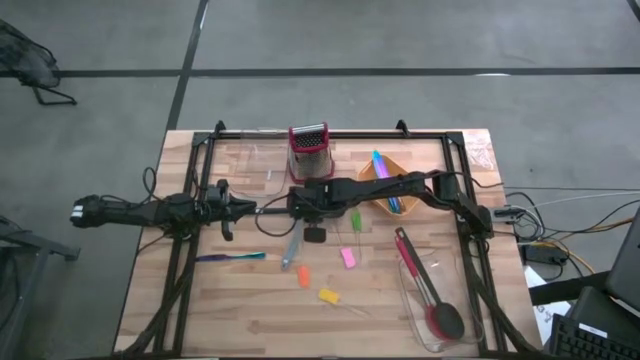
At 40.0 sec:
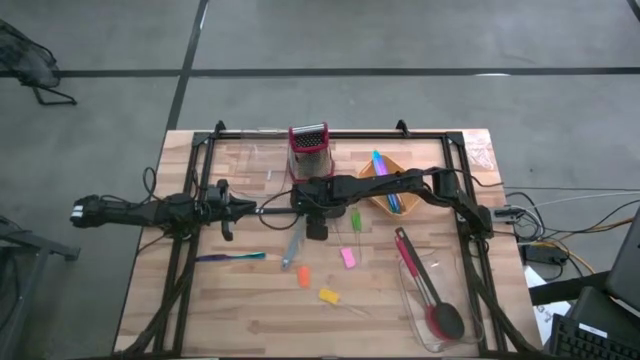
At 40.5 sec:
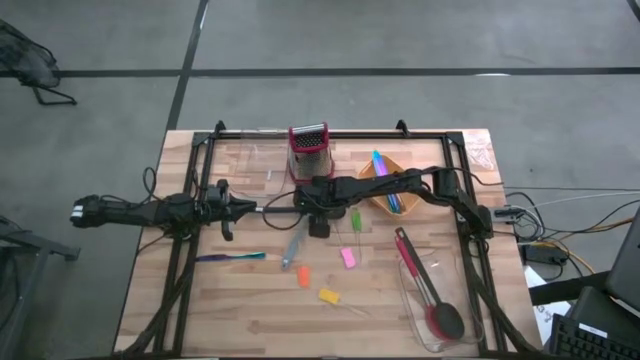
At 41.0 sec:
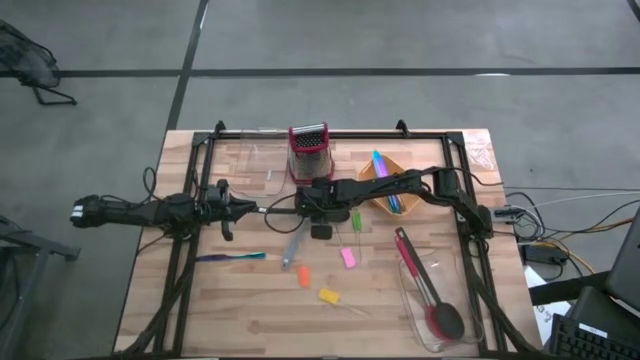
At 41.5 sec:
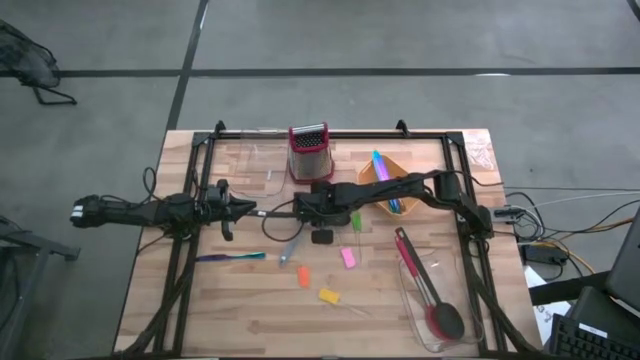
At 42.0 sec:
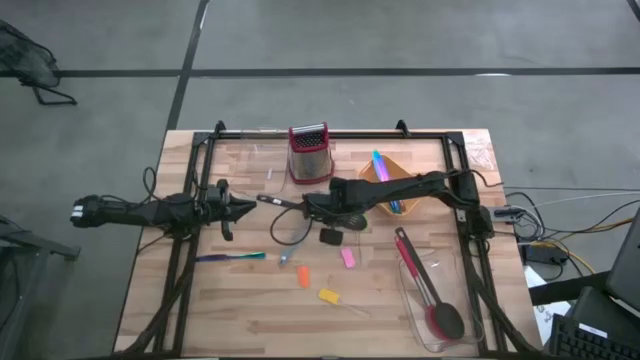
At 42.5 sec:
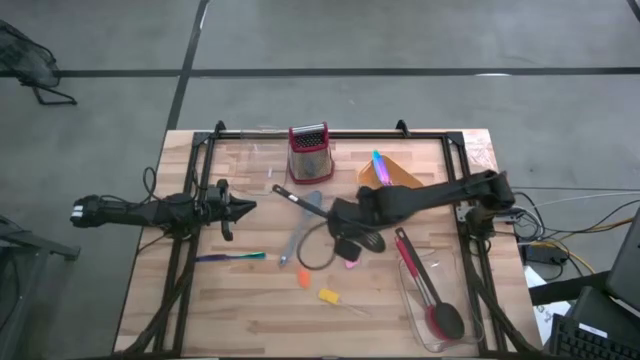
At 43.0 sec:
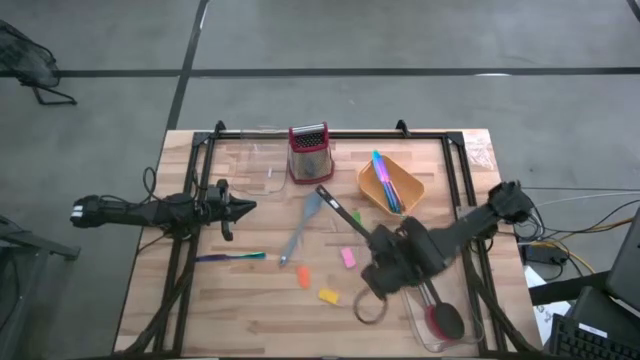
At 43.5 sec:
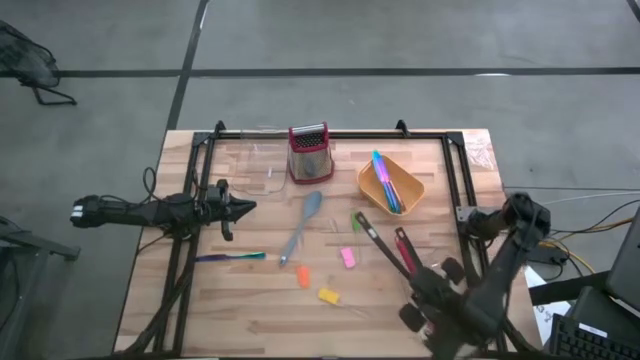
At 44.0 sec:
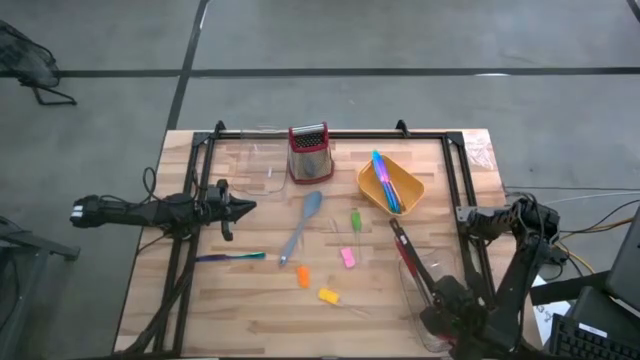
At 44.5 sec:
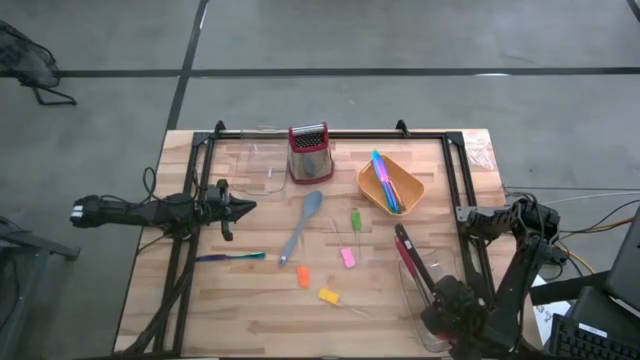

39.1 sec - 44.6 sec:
Task: Pick & Place Kitchen Items
Put the black serving spoon into the bottom transparent bin

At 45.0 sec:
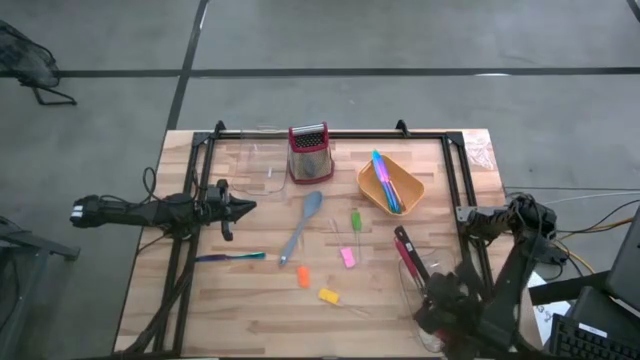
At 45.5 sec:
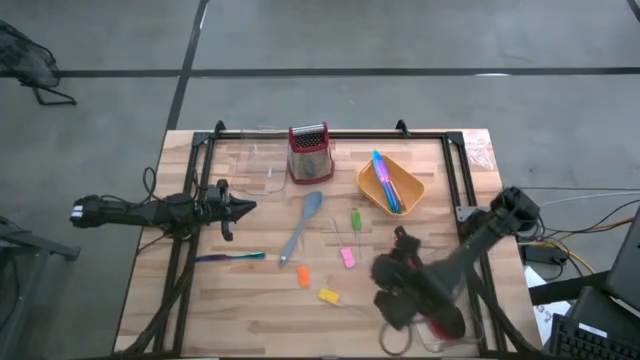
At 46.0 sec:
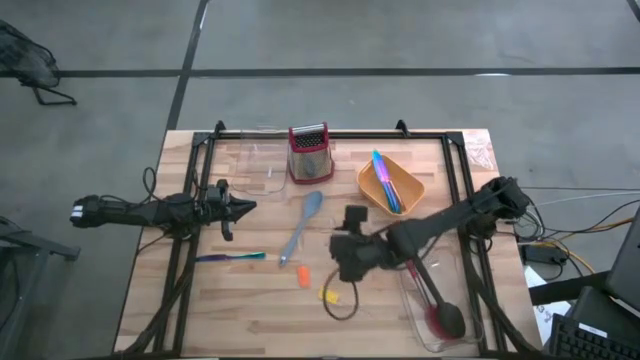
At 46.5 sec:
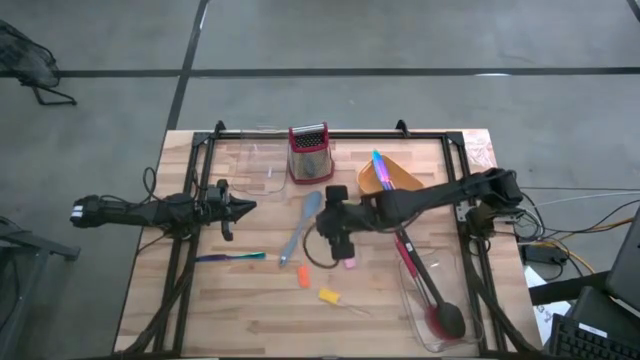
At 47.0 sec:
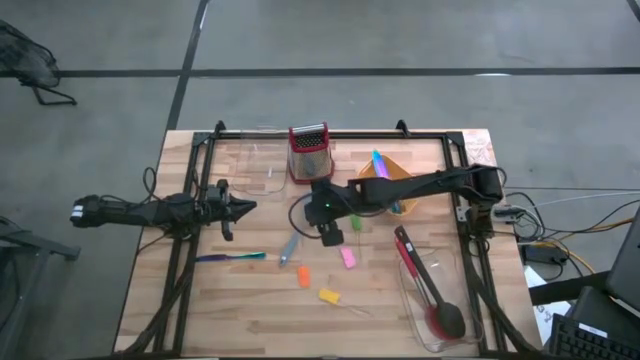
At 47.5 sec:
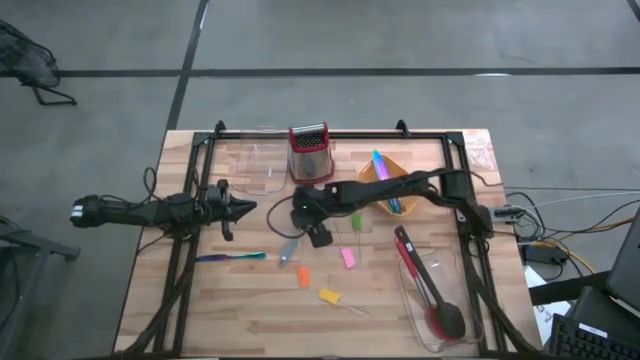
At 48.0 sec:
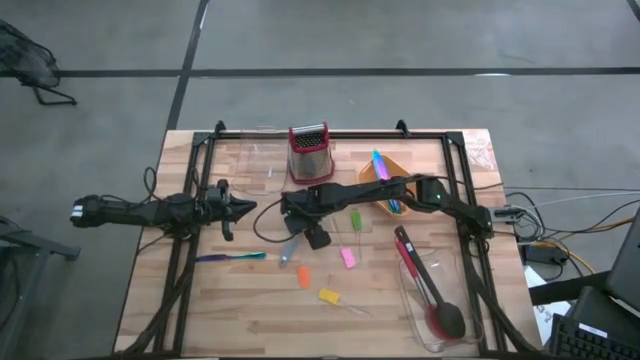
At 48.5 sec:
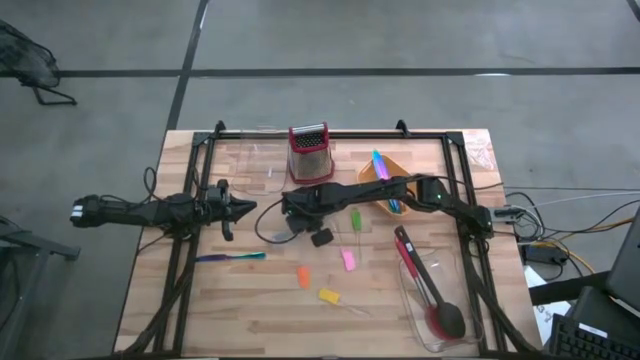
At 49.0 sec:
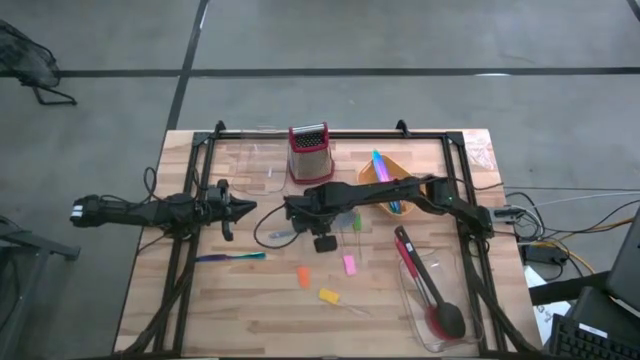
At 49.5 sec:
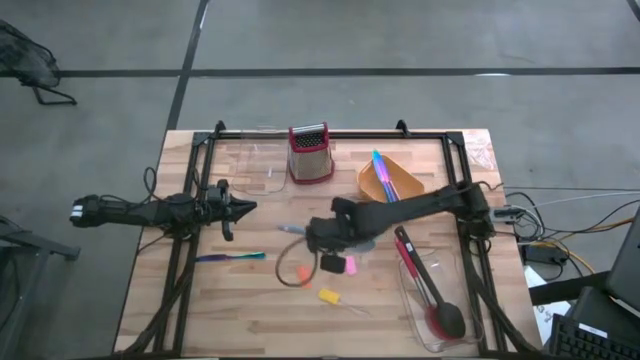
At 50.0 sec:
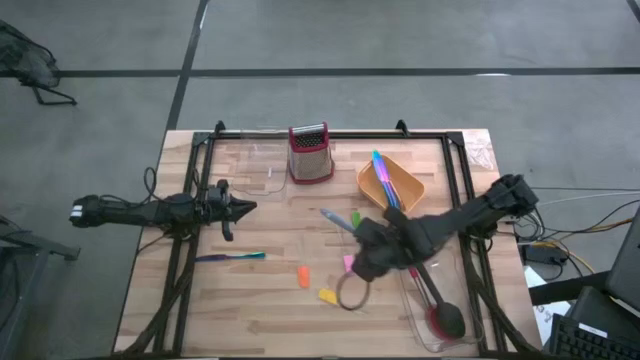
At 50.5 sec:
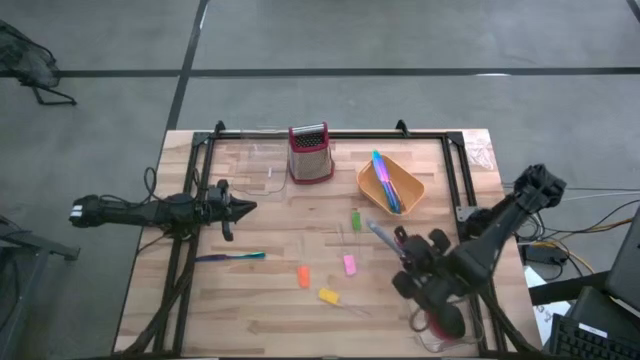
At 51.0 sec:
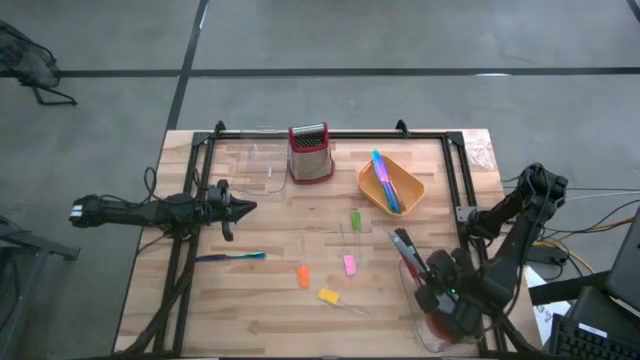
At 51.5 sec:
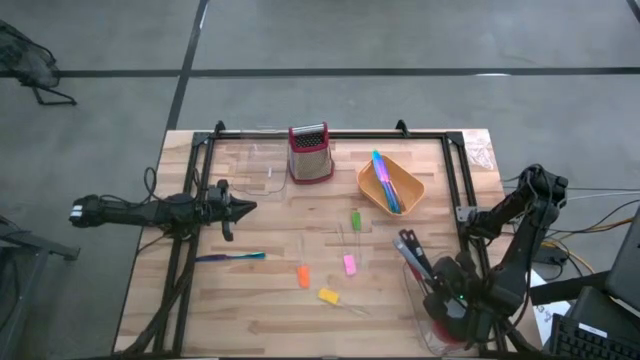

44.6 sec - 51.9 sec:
Put the blue serving spoon into the bottom transparent bin

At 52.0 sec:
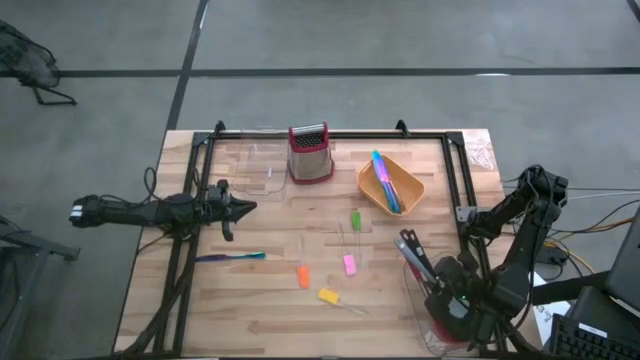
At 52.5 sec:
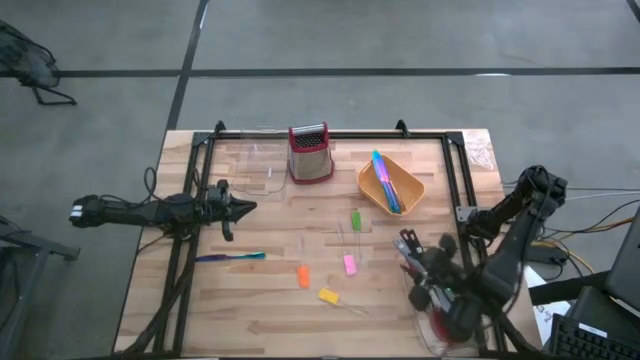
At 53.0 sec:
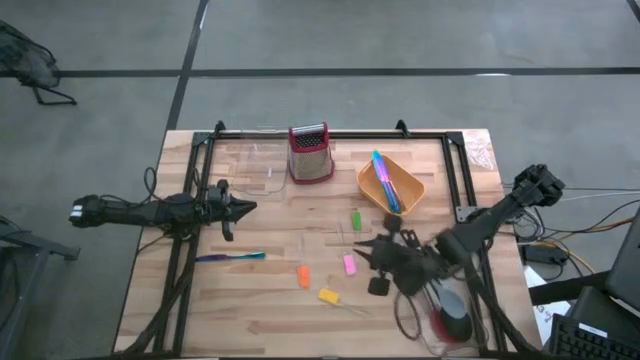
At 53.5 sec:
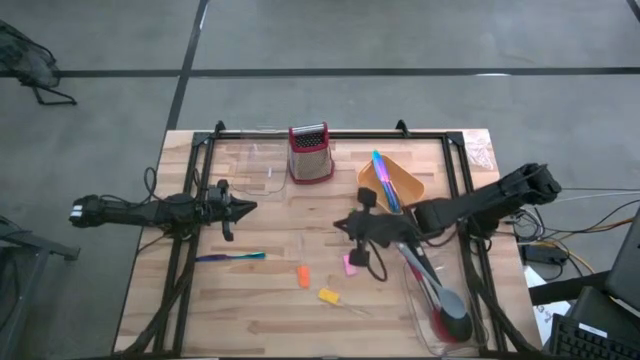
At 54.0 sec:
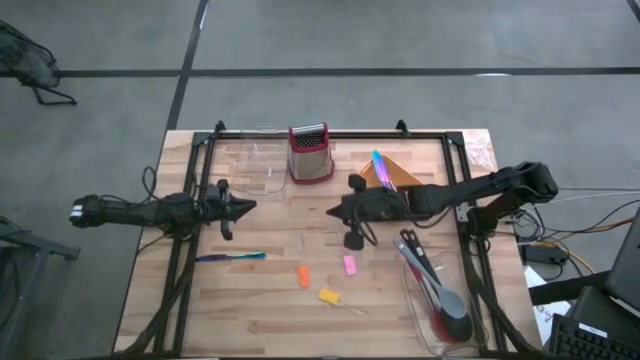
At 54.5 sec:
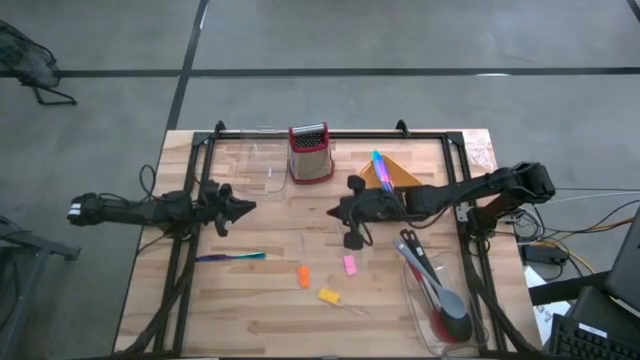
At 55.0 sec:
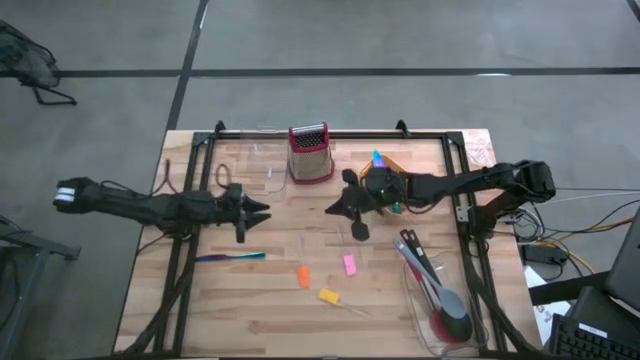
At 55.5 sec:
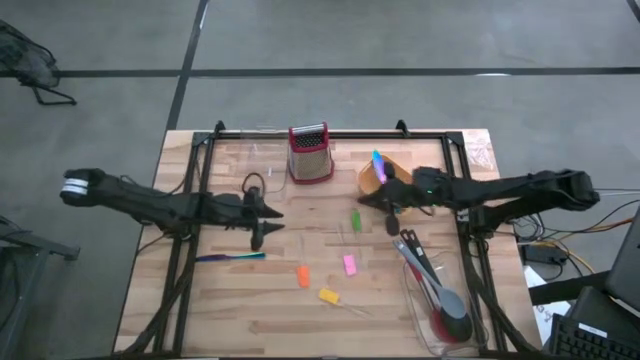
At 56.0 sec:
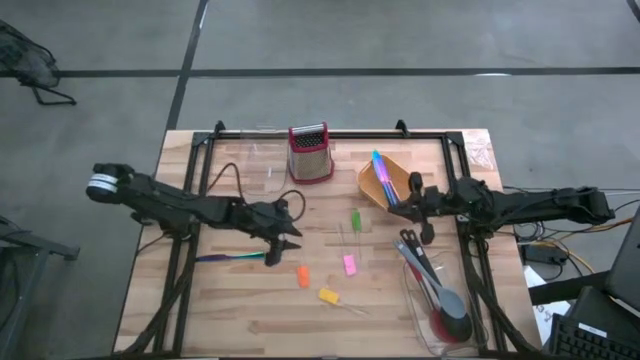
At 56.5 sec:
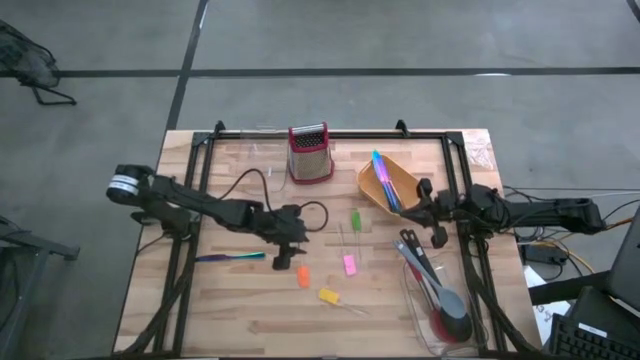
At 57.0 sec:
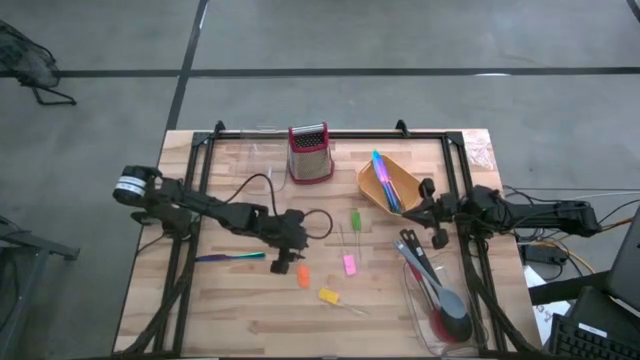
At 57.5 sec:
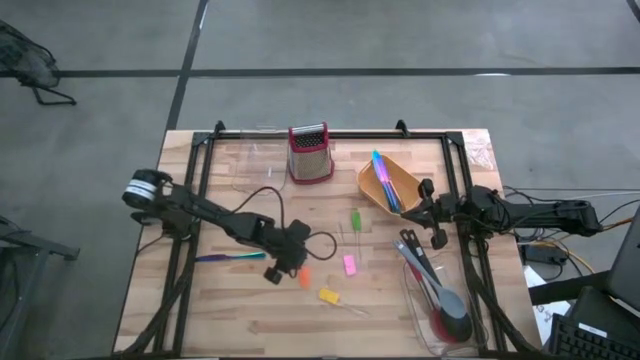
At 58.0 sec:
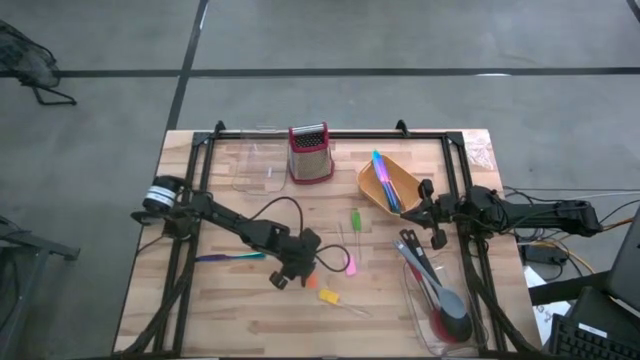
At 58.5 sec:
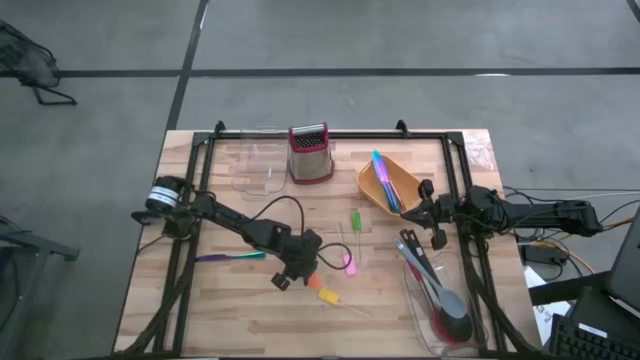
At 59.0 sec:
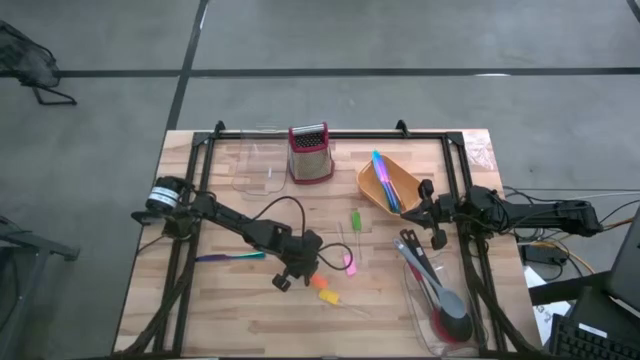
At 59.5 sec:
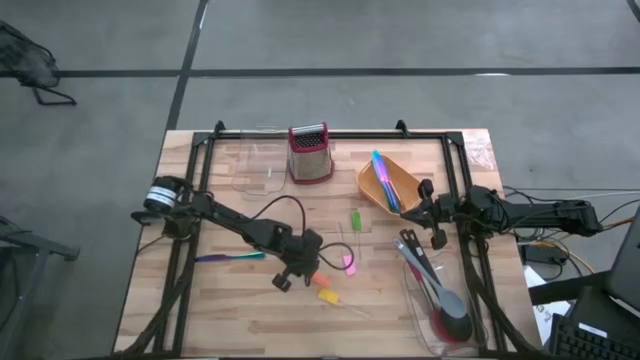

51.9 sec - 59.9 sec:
Put the orange spatula into the top transparent bin
